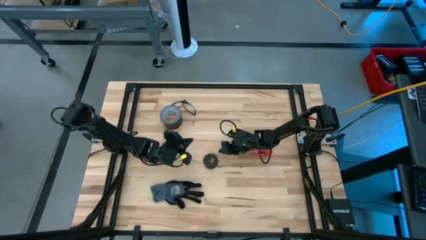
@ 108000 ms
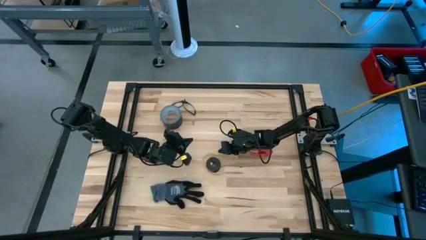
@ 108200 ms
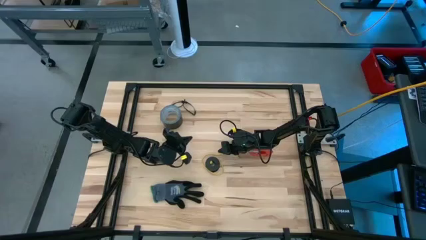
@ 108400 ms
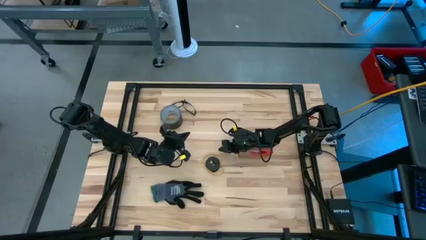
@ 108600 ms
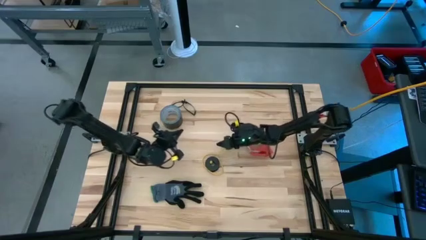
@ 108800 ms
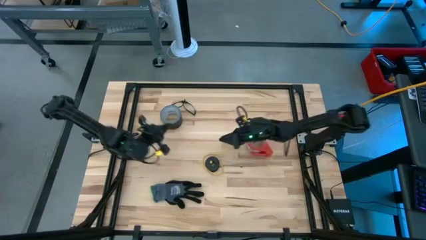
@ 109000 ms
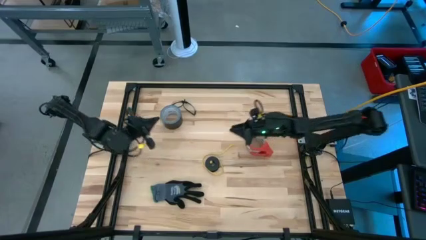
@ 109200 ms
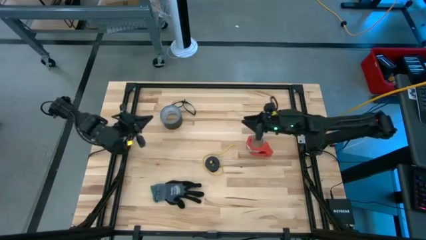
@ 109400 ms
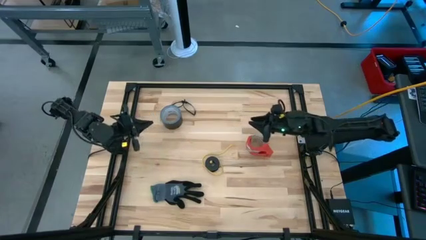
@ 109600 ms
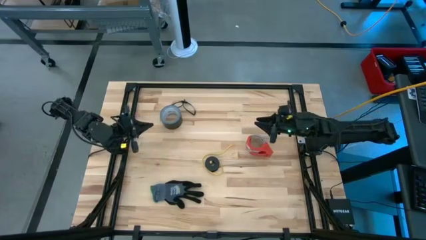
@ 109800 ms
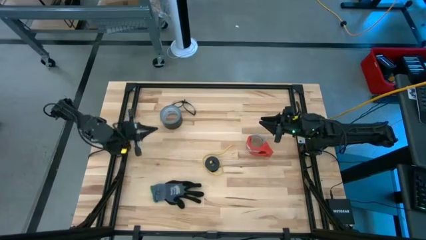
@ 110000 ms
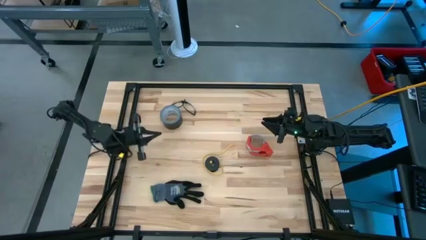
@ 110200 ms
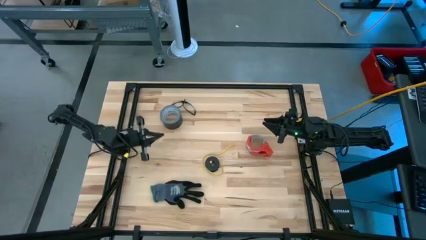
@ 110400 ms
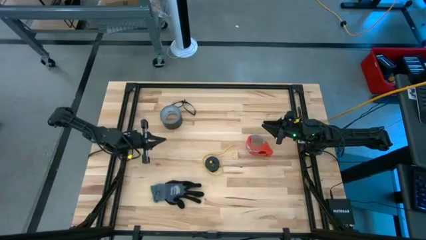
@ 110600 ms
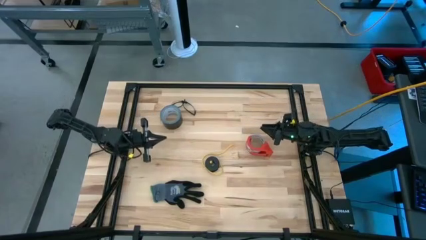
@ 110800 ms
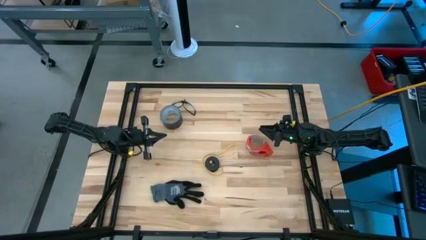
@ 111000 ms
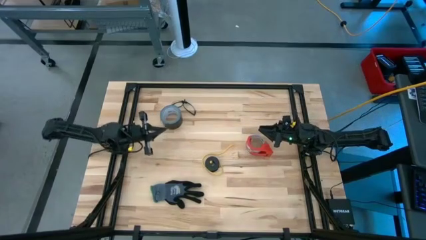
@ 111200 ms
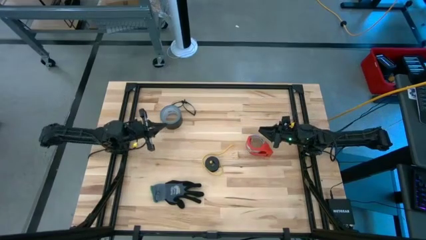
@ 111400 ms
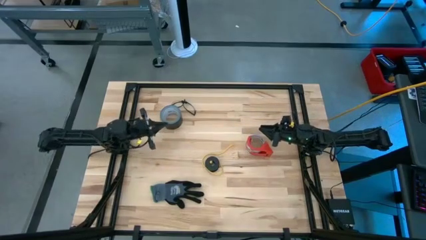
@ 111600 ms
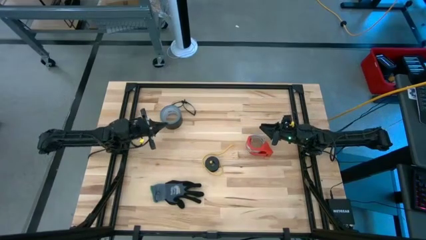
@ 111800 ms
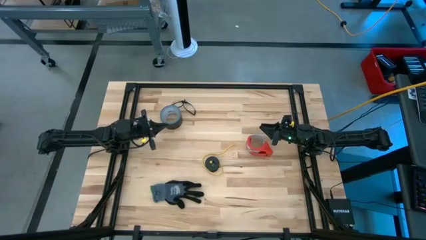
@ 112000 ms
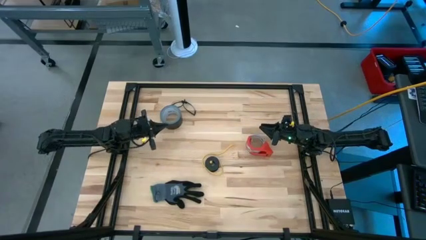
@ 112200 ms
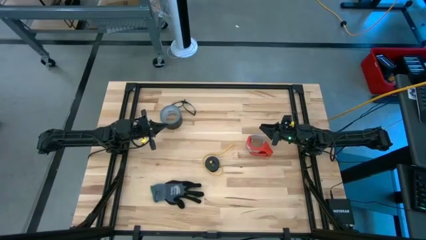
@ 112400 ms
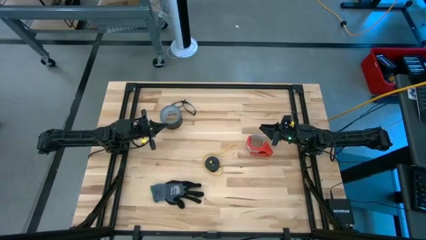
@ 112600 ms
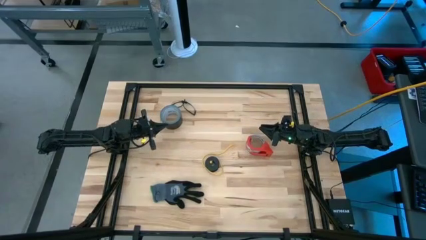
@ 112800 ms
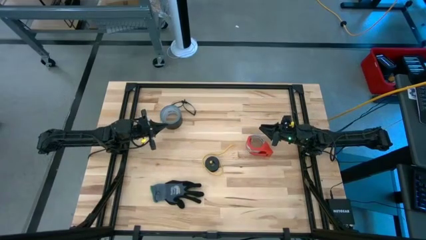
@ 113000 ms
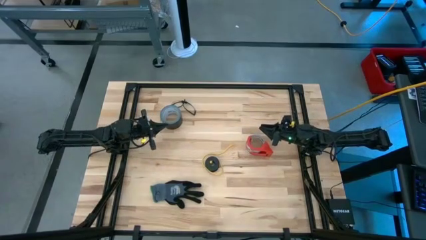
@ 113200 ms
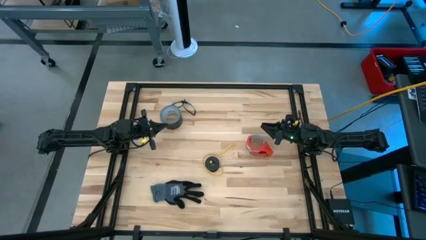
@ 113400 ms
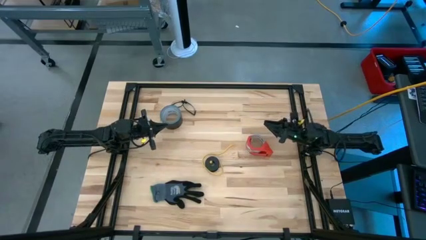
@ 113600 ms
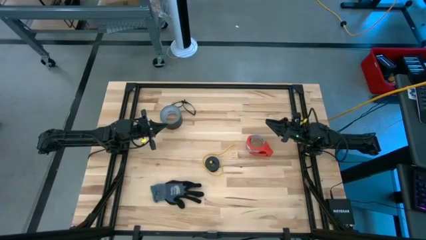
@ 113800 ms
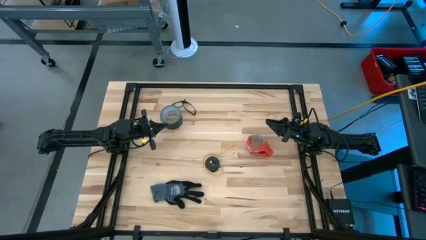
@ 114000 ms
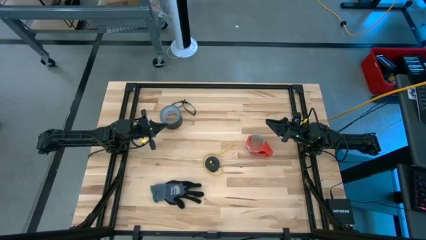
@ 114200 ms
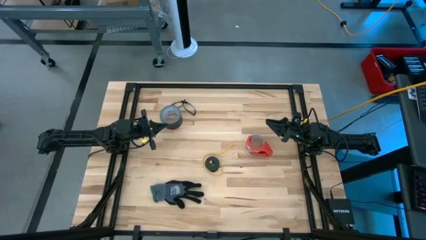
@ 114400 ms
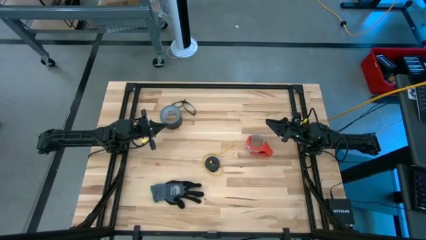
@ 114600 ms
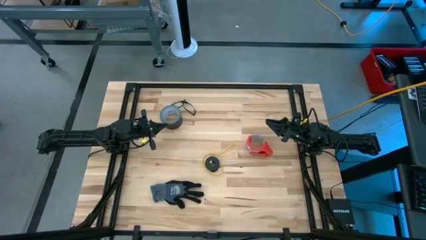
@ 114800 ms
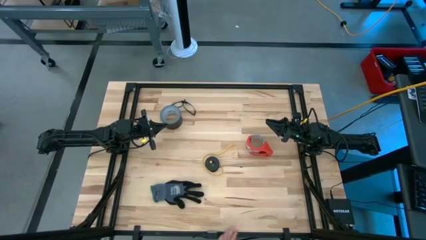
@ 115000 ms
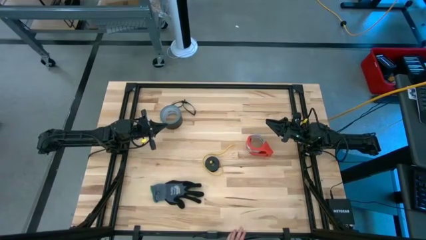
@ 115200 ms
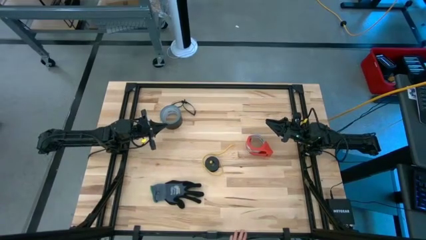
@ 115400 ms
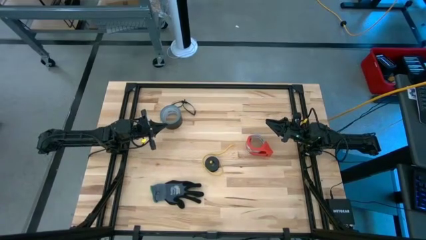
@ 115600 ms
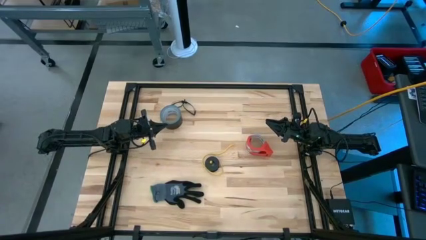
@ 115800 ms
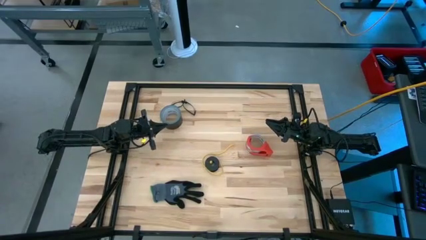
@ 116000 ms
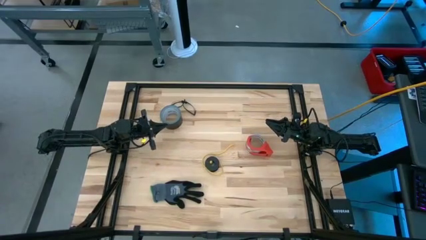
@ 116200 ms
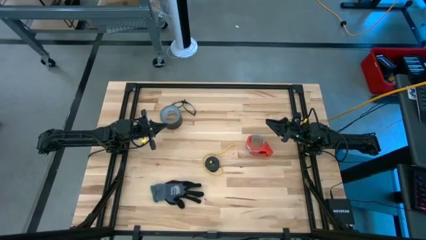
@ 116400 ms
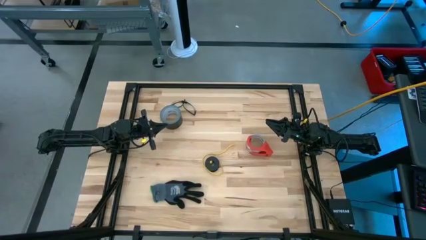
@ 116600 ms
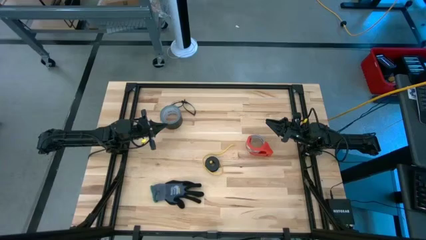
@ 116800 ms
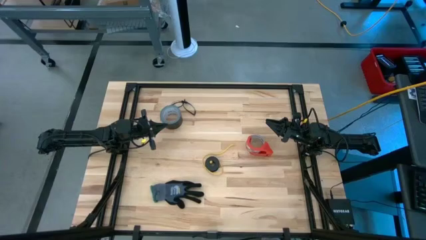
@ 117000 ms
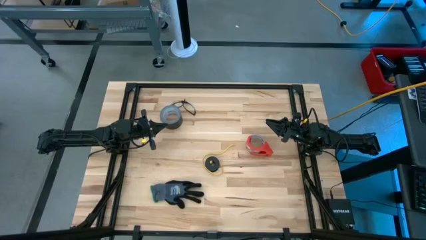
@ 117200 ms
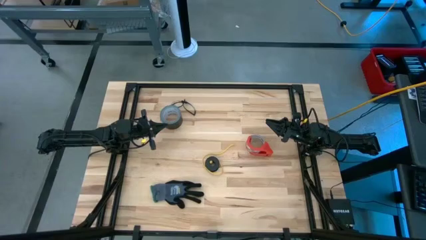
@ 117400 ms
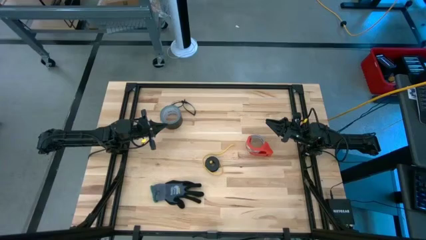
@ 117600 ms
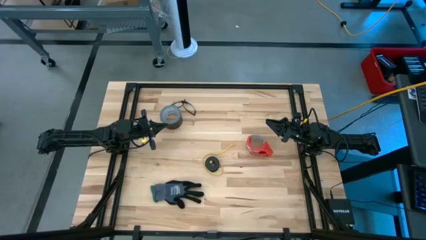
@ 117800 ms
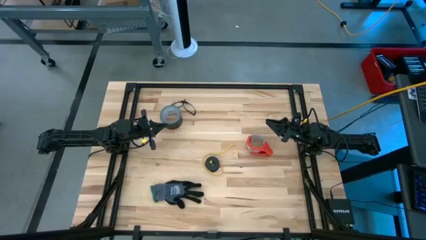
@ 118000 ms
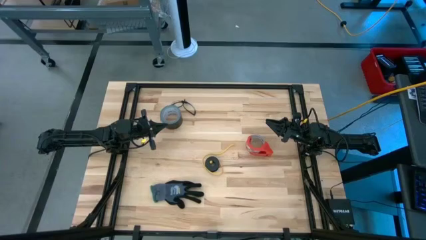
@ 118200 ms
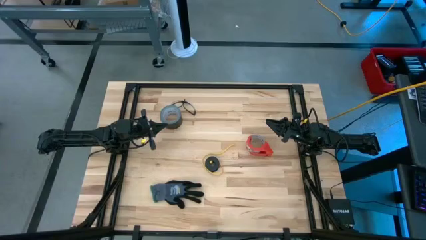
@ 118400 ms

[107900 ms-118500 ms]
Task: Coil cords
Return to Home Position

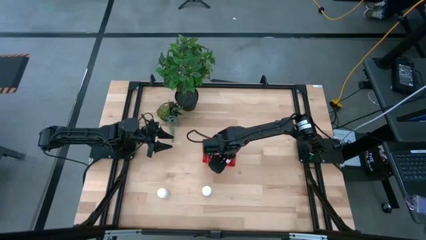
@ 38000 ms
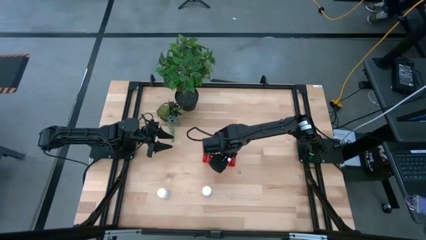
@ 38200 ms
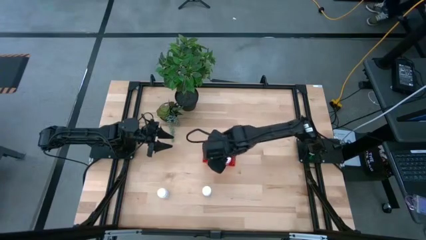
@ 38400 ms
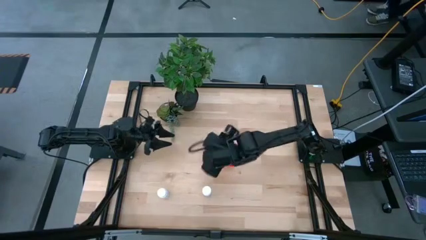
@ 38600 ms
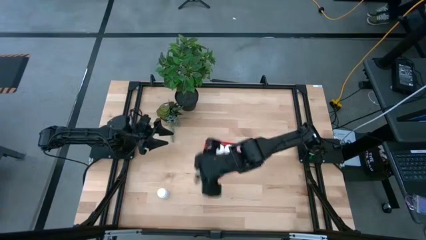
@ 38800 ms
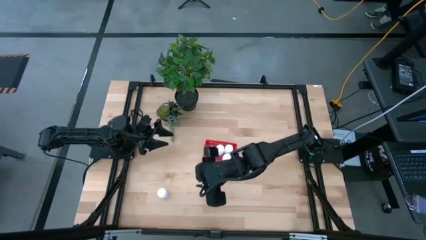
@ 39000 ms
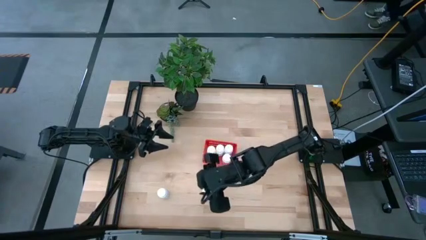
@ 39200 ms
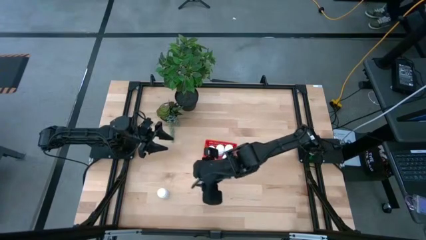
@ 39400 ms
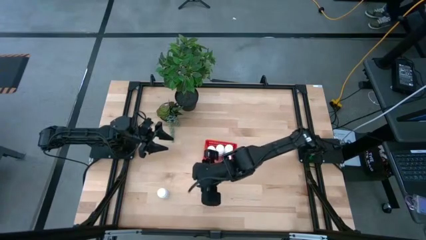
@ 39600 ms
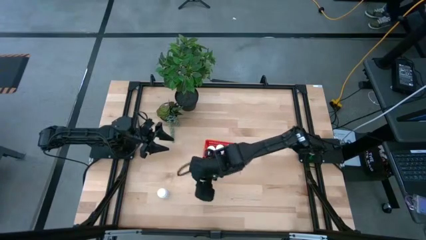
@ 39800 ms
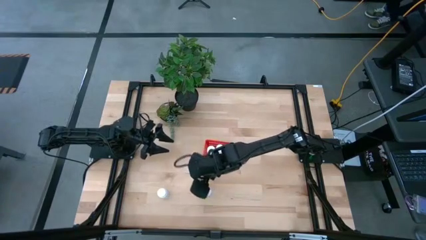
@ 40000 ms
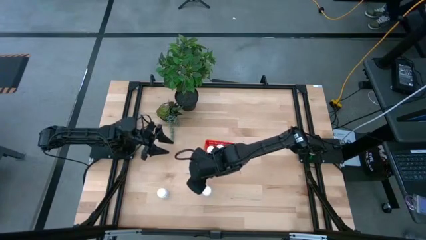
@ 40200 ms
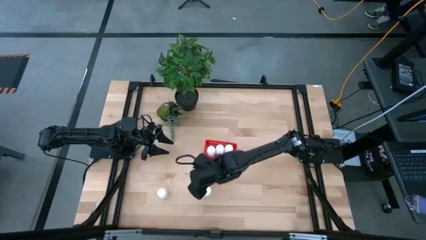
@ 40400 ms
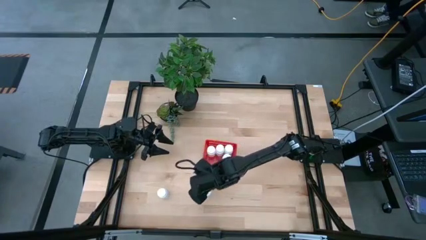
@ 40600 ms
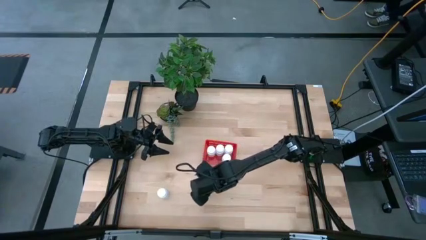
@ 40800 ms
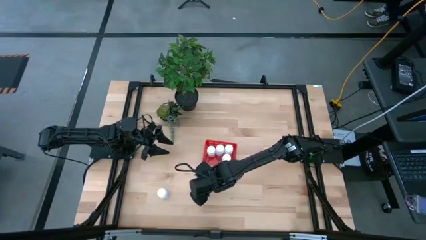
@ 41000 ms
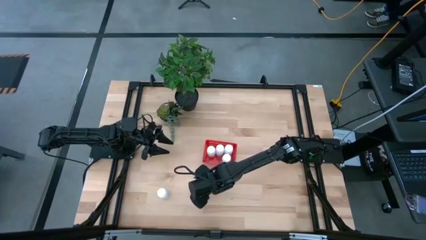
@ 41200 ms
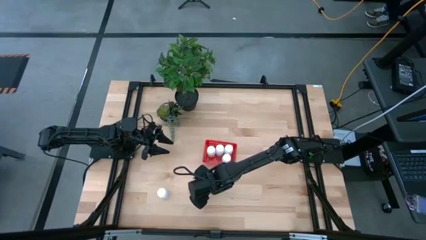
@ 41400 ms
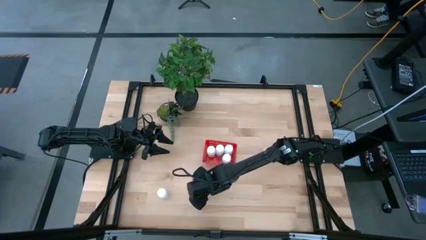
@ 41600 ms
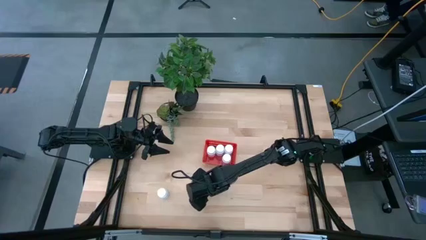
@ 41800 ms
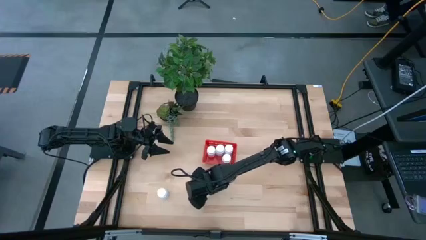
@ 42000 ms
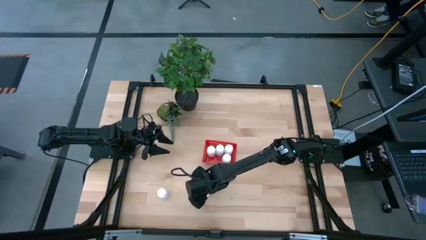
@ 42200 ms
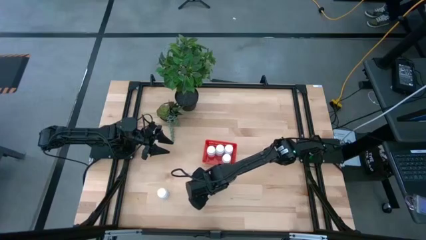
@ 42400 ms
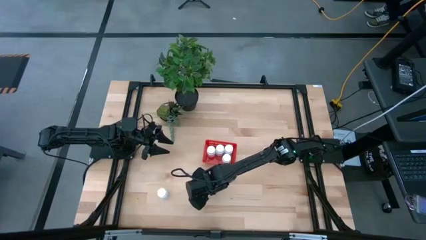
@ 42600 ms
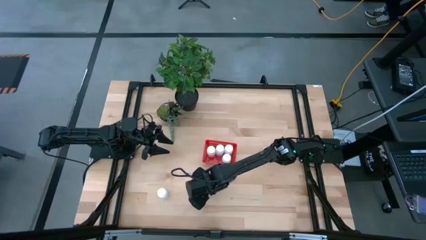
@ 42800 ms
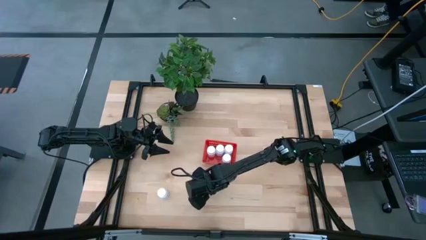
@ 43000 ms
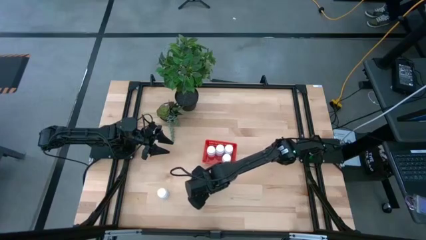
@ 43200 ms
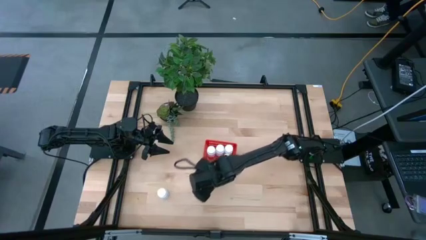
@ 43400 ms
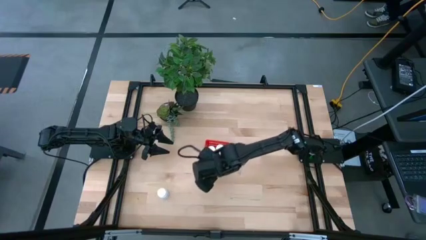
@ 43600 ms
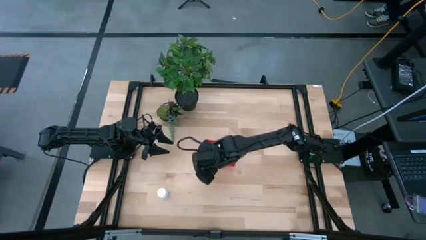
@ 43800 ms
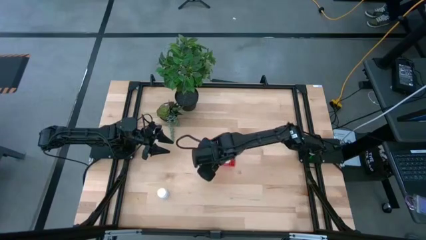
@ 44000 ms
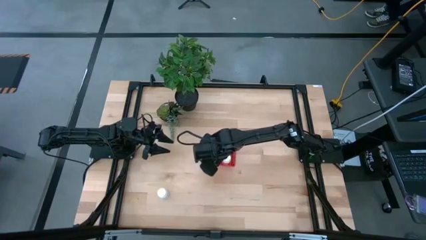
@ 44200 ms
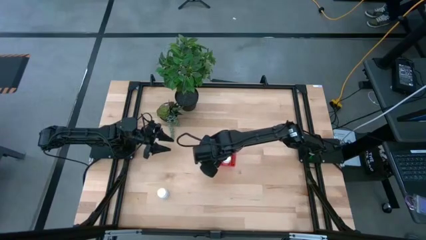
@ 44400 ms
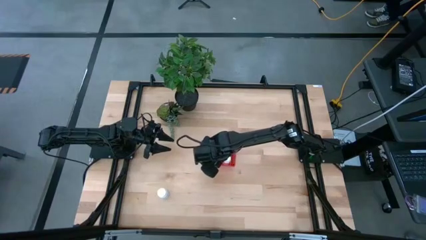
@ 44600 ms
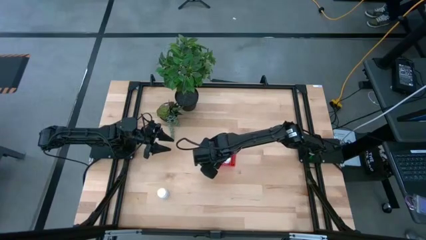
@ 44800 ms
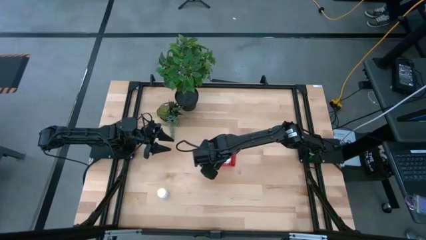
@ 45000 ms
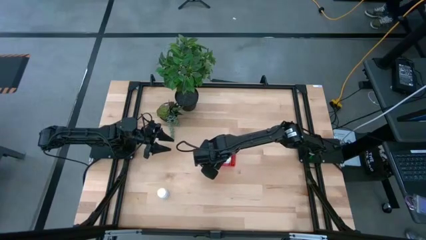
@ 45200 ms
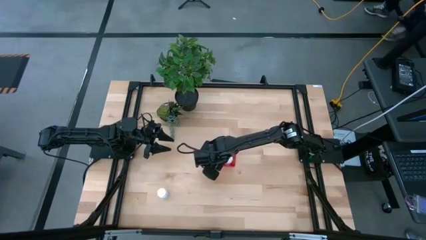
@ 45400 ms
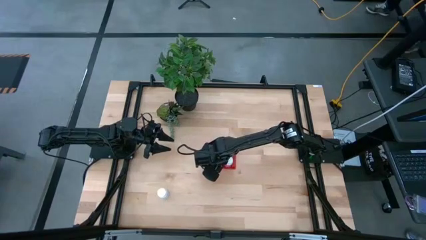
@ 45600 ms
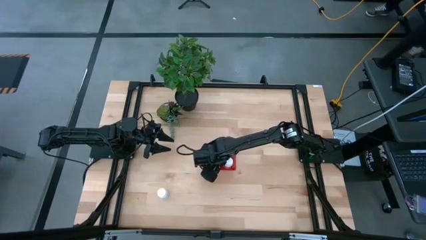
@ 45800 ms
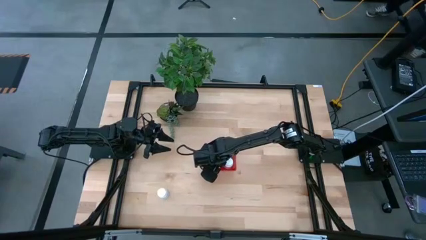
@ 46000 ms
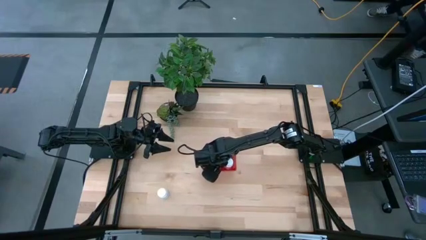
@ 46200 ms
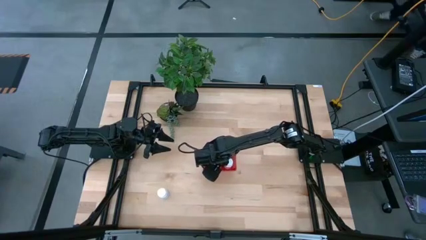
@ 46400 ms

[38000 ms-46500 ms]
Task: Pick and place pill bottles into a basket
Put the white pill bottle into the red bin
